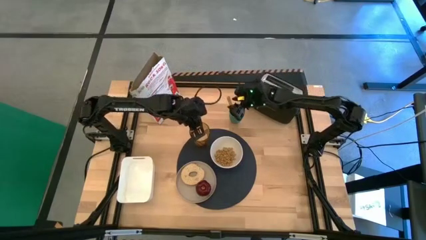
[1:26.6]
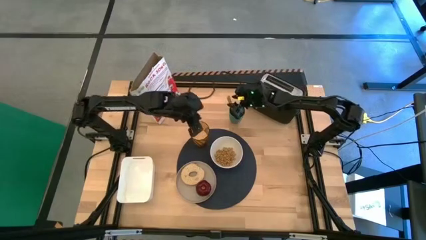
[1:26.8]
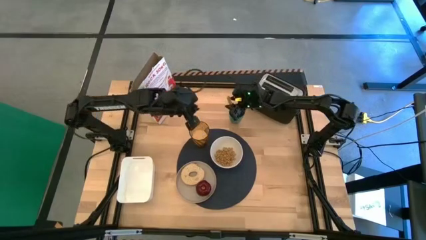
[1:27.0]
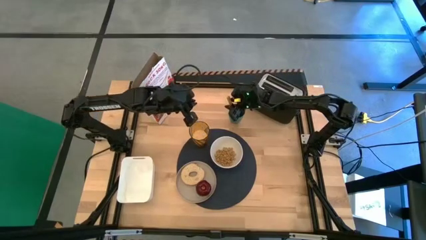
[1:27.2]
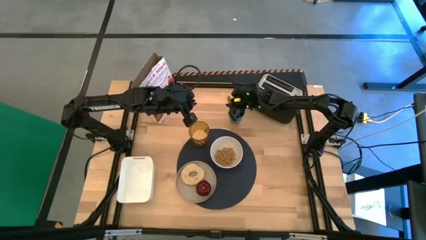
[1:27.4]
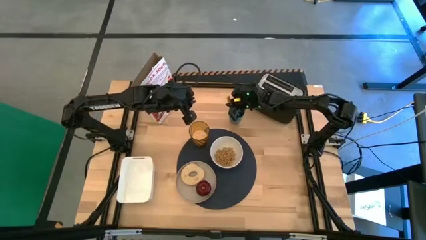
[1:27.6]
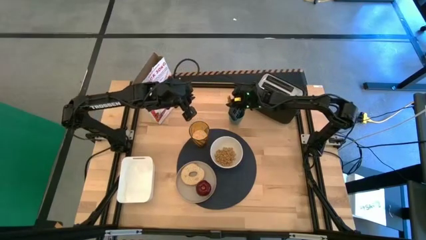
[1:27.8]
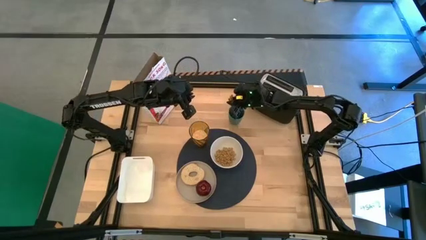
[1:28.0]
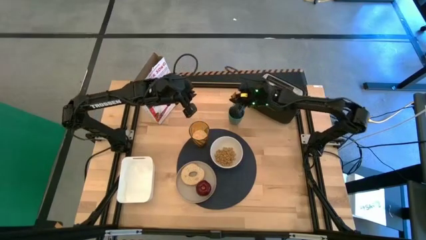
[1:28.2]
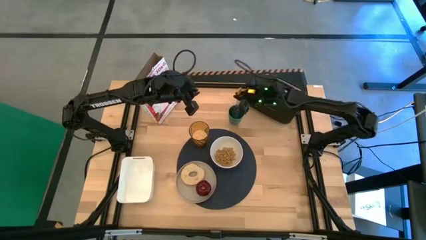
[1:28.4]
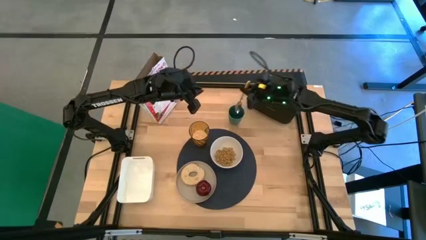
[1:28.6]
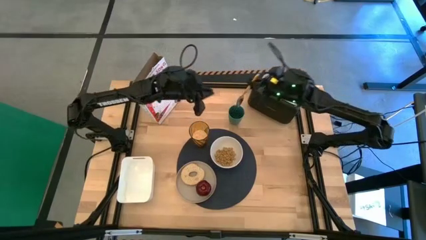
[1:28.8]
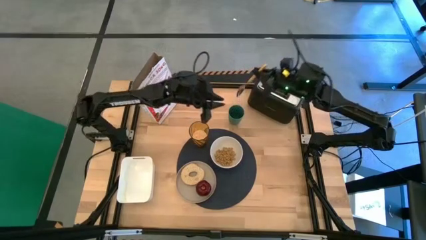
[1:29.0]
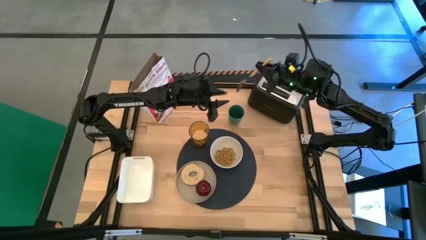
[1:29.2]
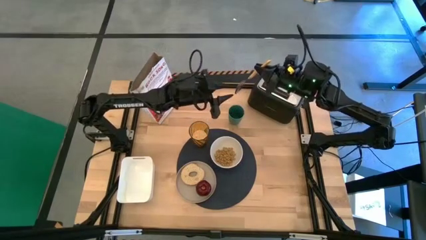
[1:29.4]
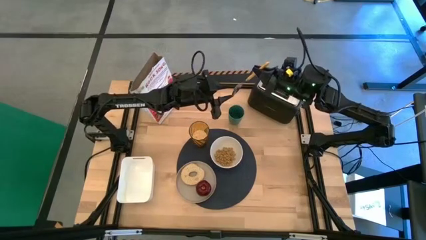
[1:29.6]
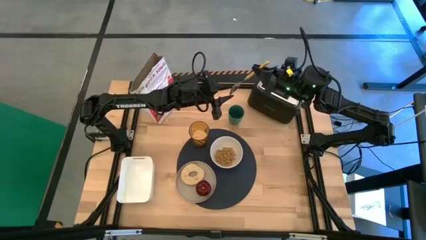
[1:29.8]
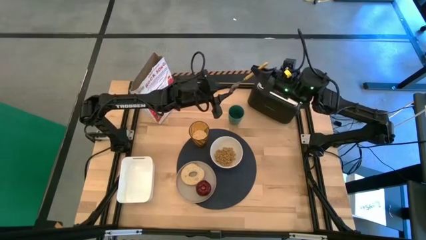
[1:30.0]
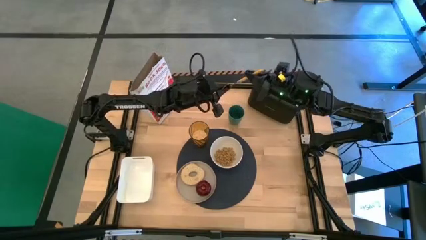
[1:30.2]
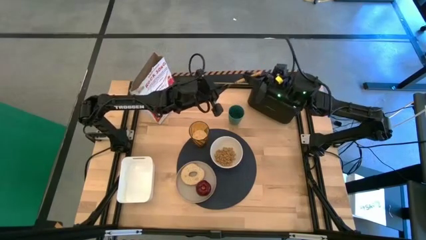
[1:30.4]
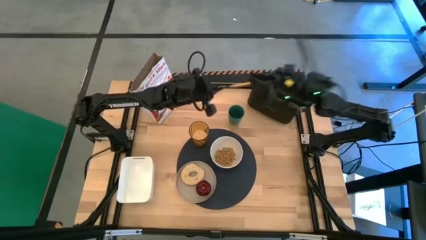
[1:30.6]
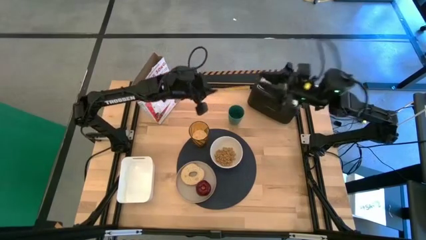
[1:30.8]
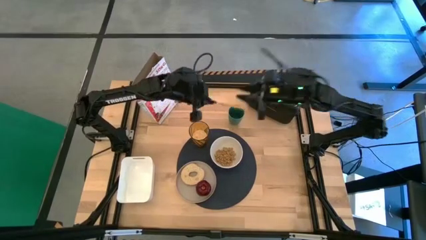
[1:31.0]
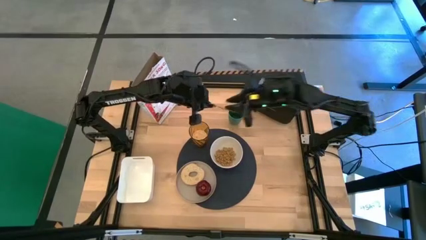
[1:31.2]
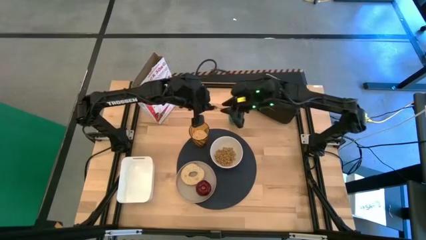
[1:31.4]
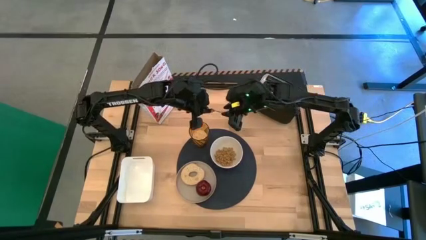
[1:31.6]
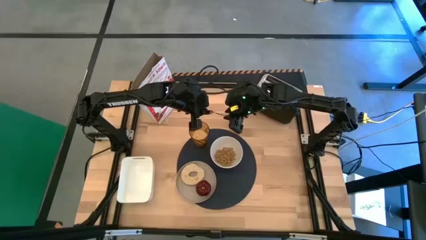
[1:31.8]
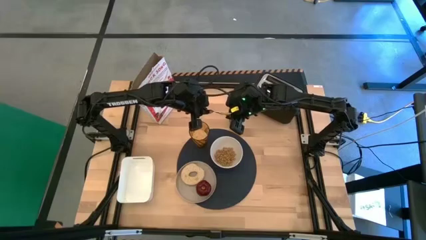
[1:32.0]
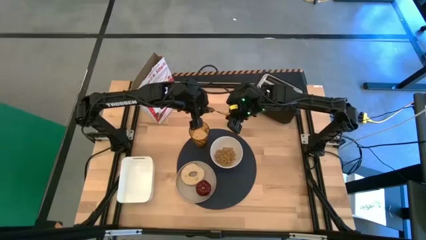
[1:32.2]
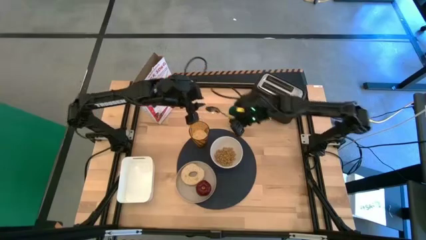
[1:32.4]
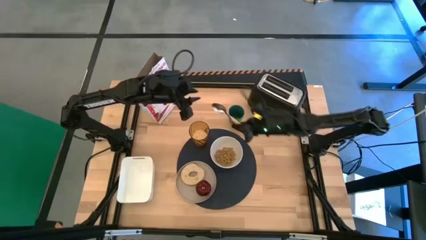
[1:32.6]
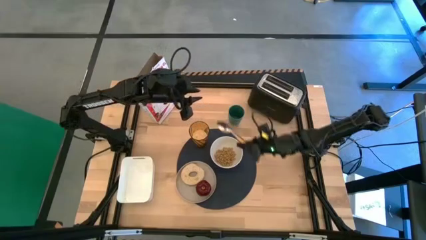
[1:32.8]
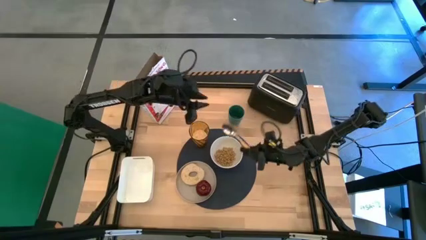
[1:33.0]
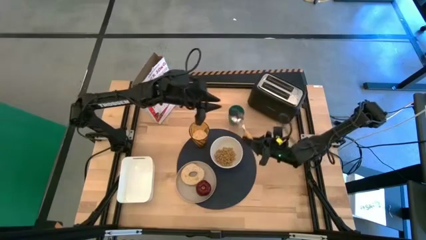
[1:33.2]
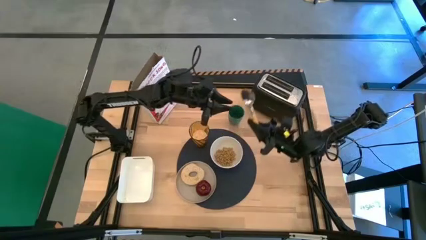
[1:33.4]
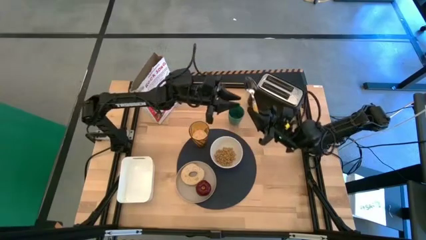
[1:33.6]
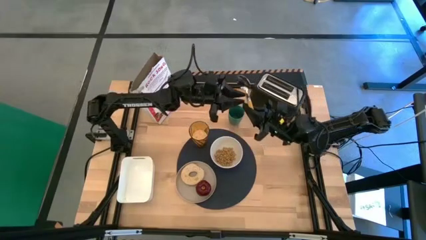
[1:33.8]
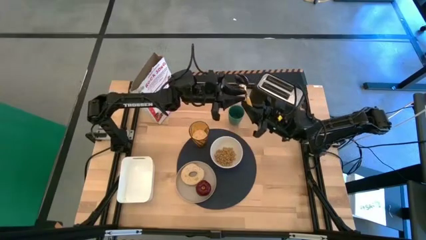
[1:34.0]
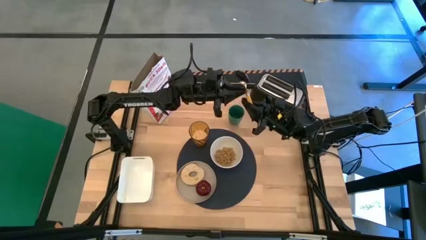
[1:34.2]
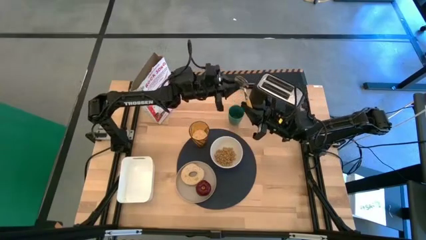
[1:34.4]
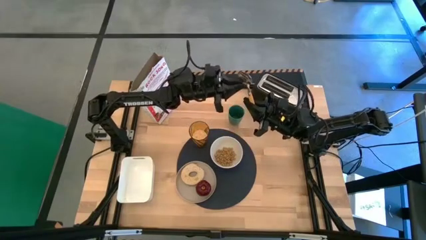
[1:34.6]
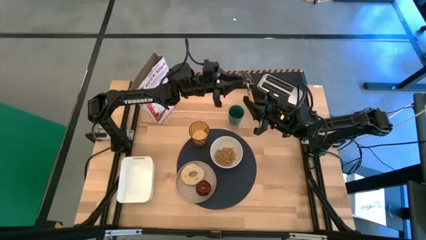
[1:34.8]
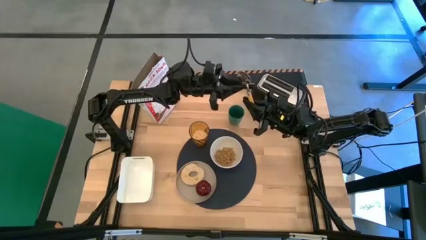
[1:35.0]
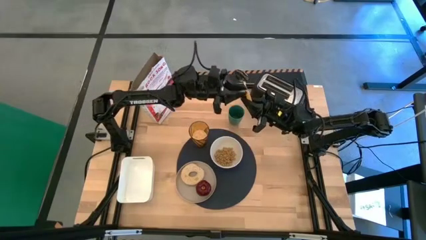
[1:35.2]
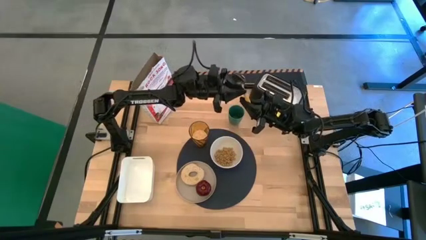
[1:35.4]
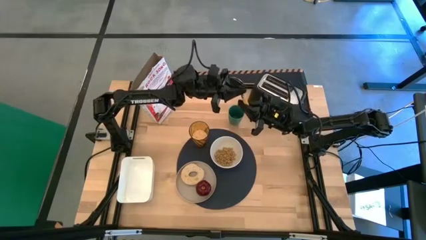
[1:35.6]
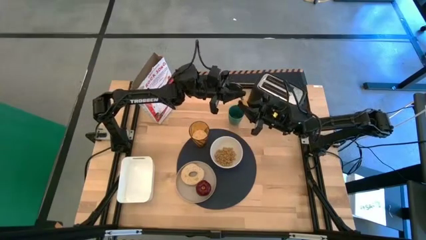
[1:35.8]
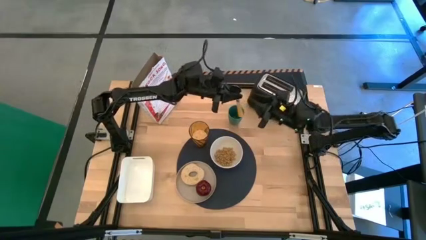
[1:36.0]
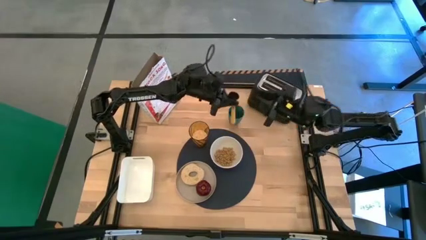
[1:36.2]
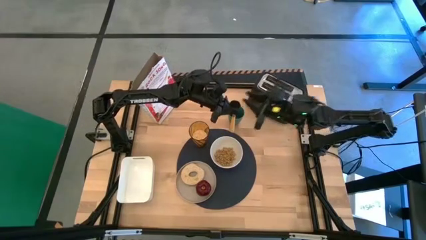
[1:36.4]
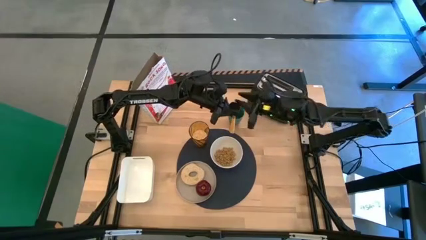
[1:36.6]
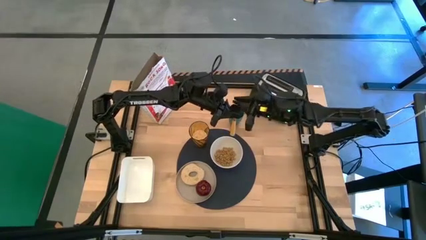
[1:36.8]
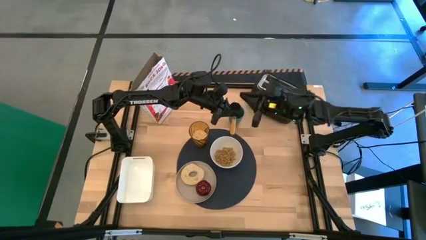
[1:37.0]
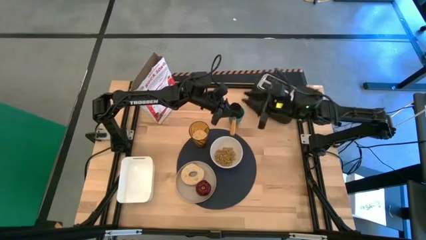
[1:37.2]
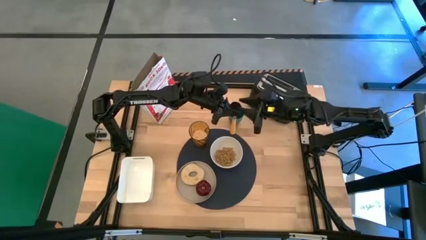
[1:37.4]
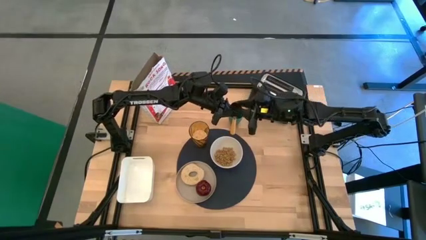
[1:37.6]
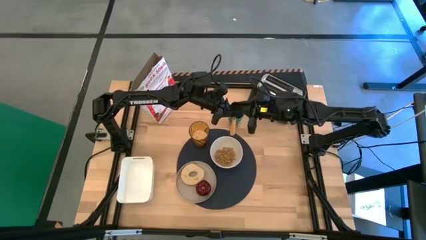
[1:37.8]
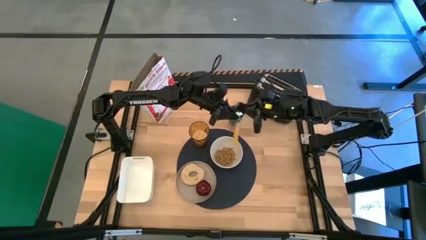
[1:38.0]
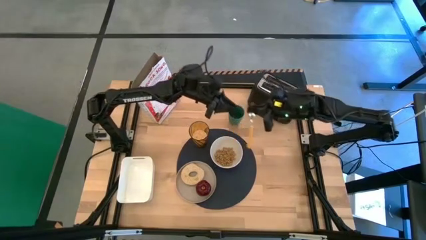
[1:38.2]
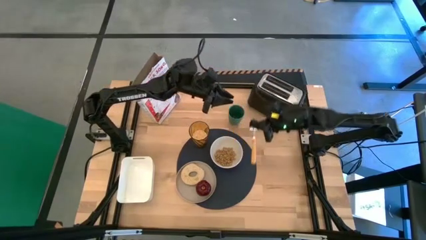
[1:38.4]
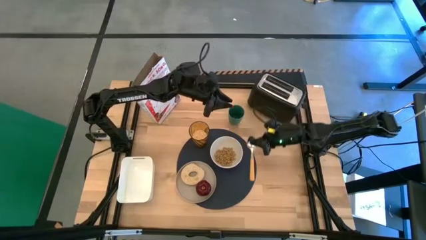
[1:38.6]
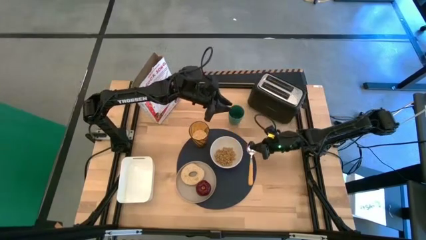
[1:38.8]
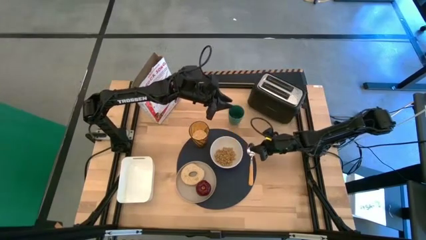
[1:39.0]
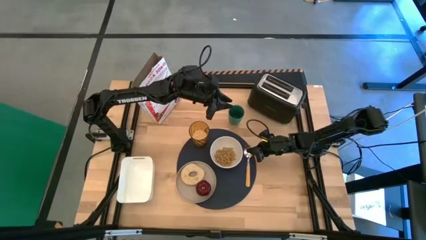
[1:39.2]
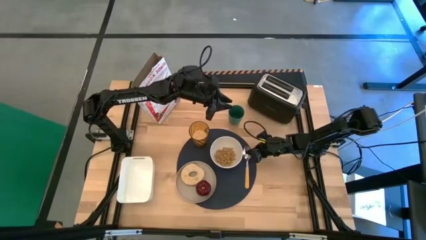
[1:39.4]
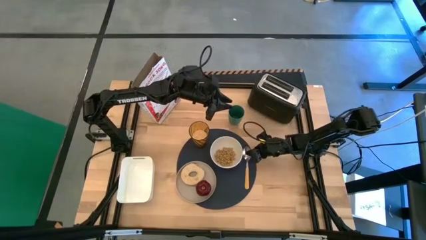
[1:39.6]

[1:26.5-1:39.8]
Task: Arrange a breakfast setting
Put the orange spoon onto the black table mat to the right of the white bowl
